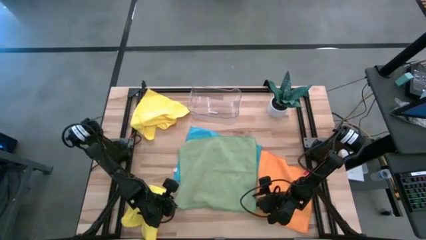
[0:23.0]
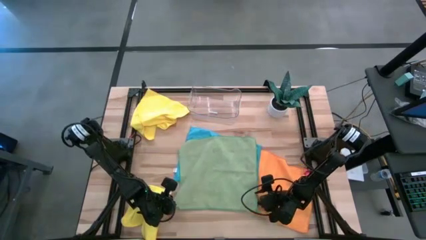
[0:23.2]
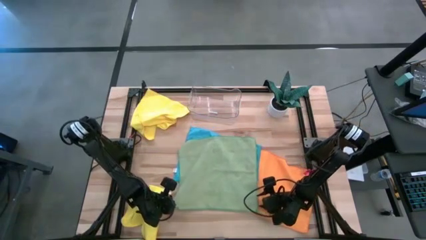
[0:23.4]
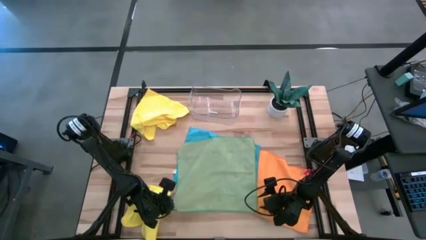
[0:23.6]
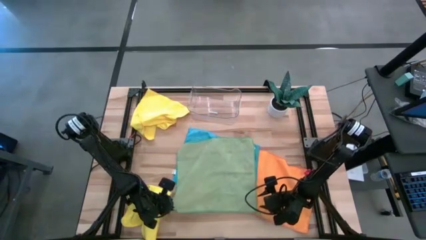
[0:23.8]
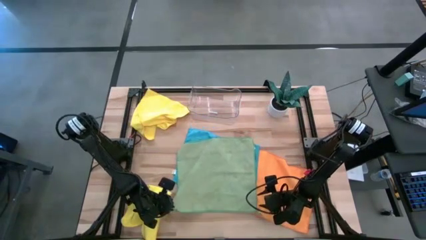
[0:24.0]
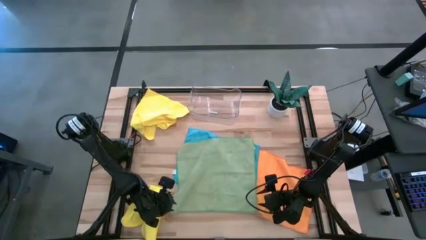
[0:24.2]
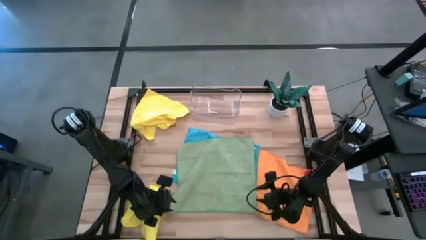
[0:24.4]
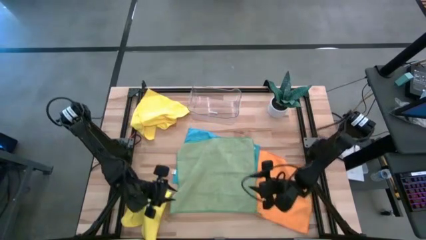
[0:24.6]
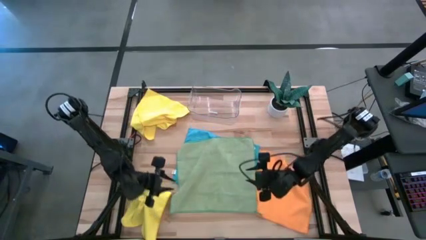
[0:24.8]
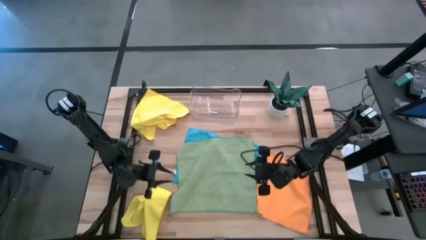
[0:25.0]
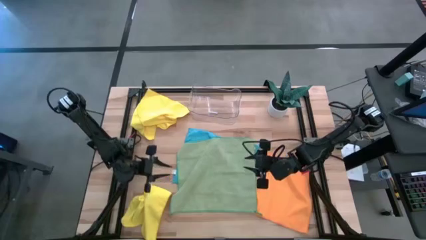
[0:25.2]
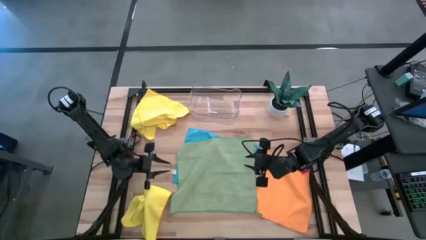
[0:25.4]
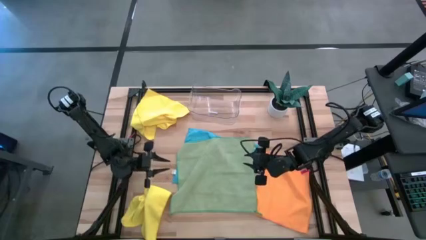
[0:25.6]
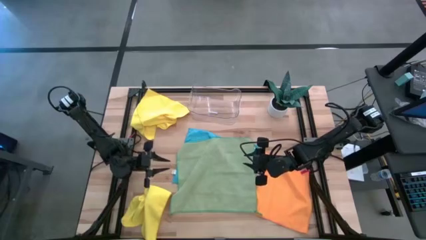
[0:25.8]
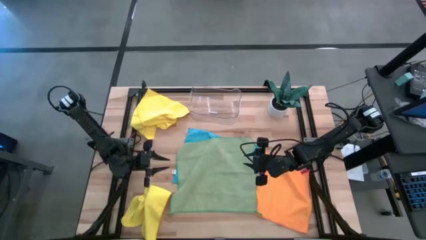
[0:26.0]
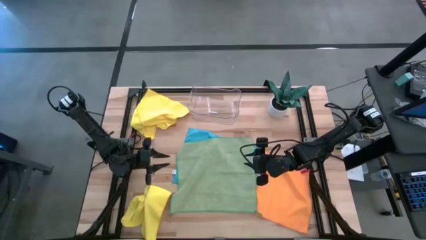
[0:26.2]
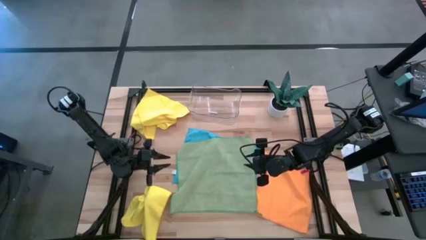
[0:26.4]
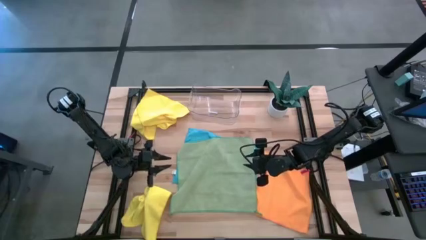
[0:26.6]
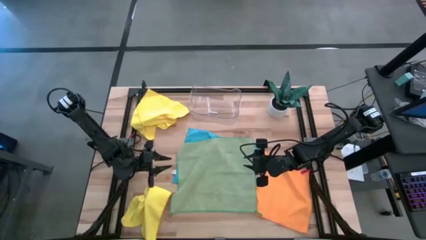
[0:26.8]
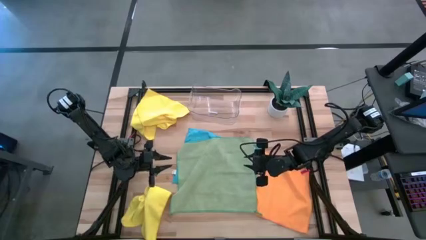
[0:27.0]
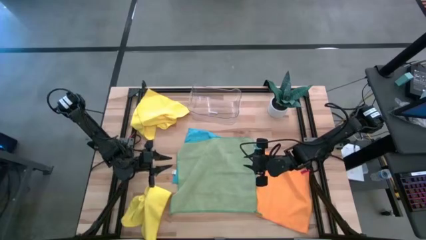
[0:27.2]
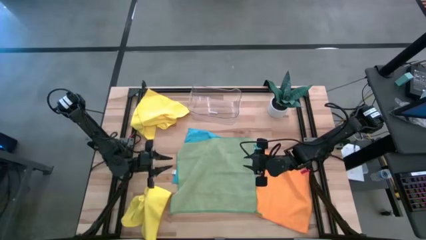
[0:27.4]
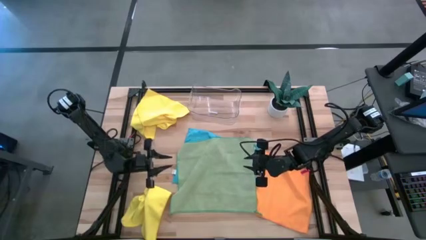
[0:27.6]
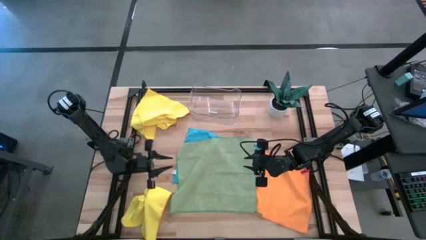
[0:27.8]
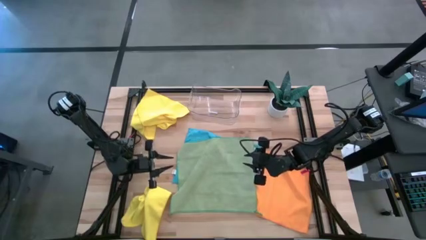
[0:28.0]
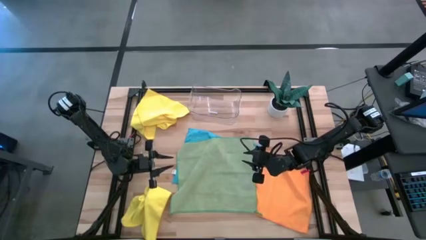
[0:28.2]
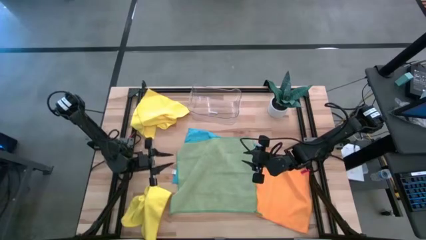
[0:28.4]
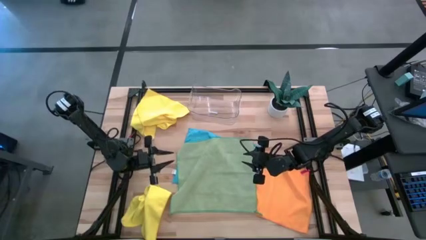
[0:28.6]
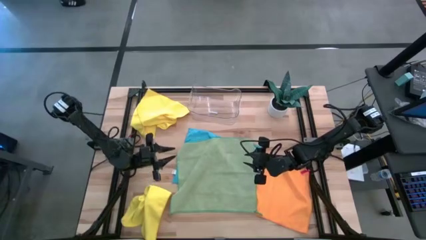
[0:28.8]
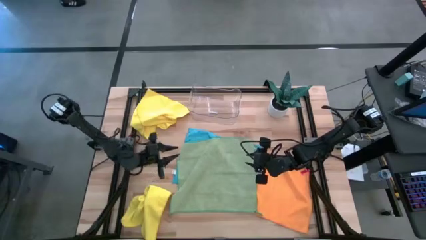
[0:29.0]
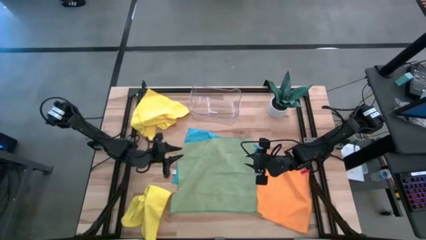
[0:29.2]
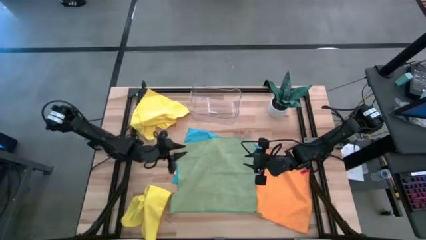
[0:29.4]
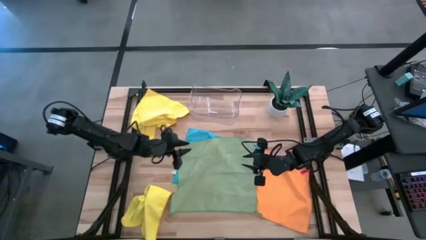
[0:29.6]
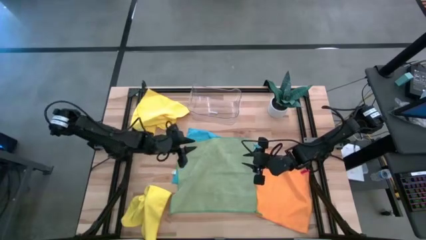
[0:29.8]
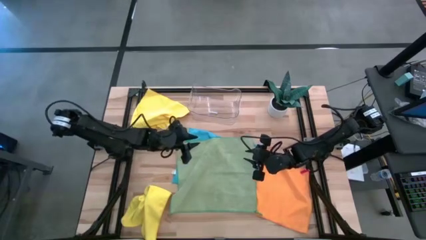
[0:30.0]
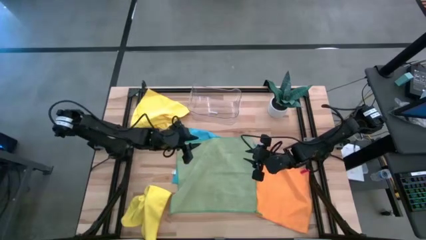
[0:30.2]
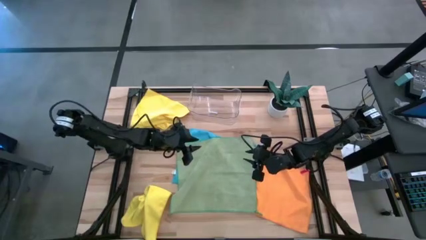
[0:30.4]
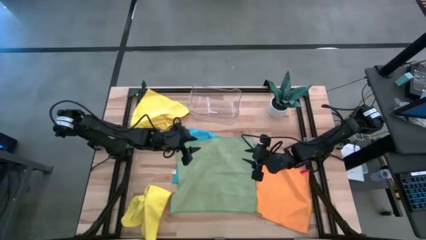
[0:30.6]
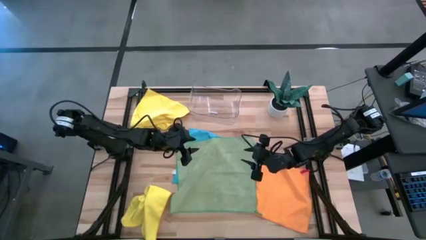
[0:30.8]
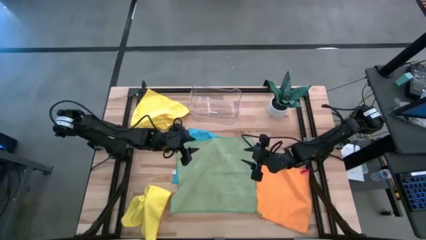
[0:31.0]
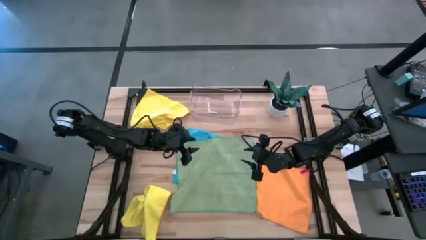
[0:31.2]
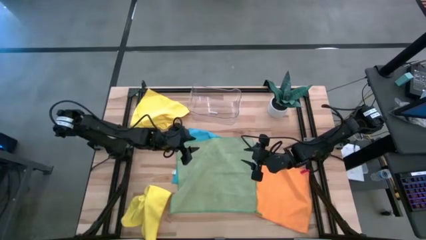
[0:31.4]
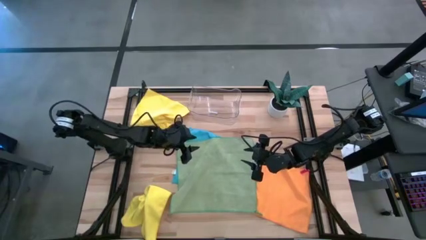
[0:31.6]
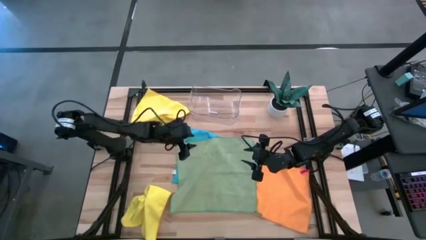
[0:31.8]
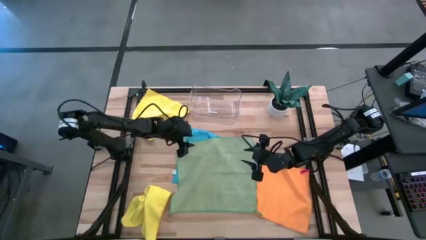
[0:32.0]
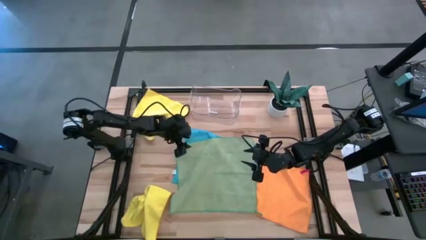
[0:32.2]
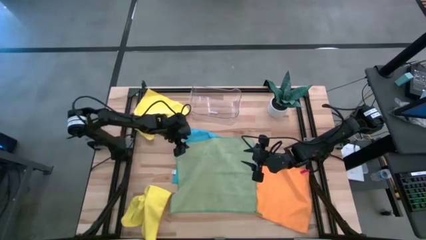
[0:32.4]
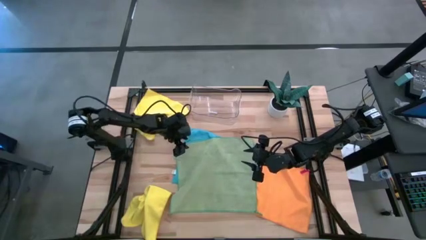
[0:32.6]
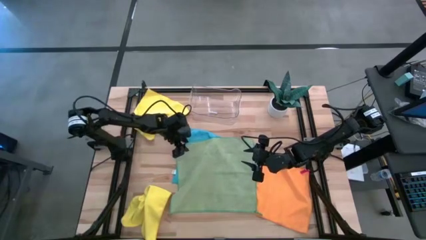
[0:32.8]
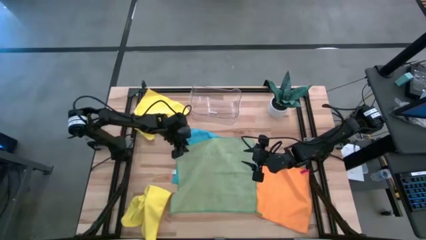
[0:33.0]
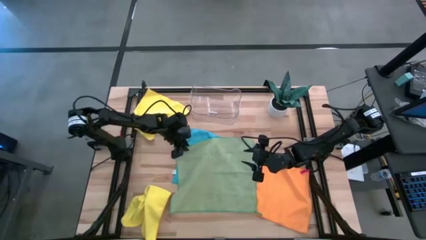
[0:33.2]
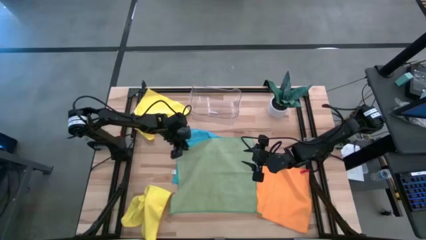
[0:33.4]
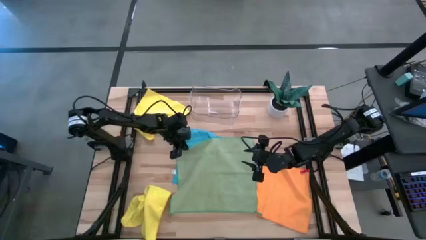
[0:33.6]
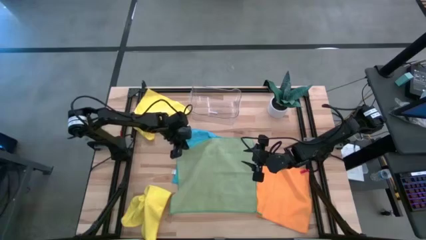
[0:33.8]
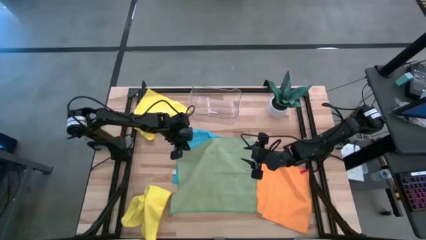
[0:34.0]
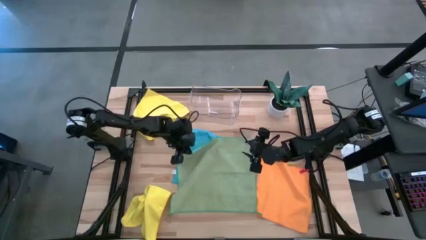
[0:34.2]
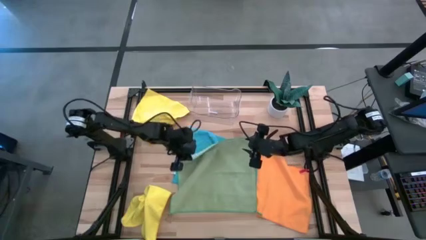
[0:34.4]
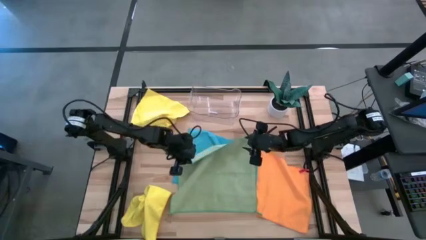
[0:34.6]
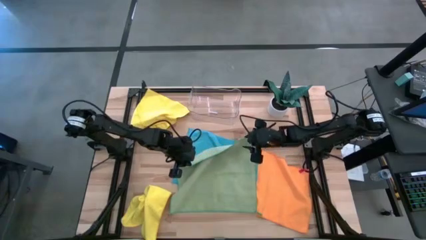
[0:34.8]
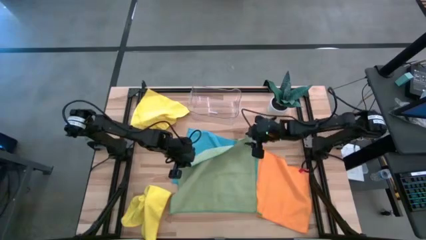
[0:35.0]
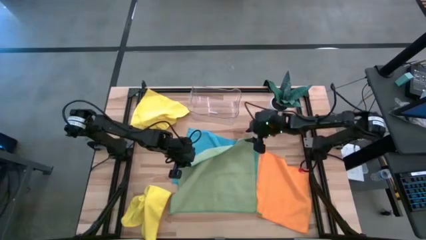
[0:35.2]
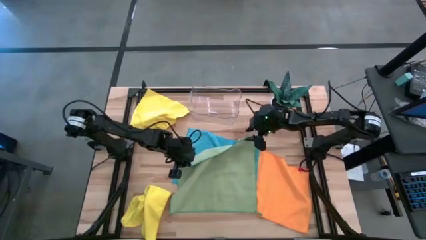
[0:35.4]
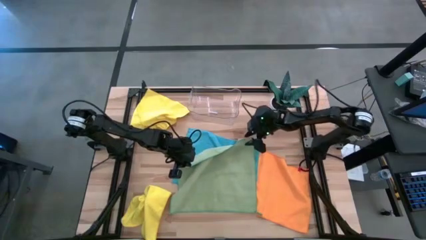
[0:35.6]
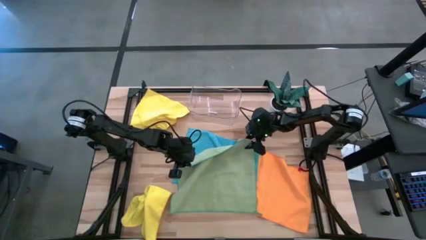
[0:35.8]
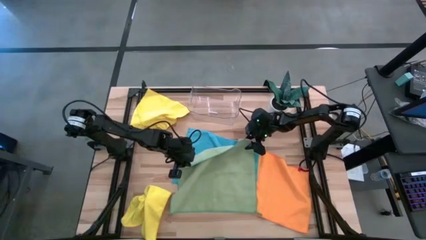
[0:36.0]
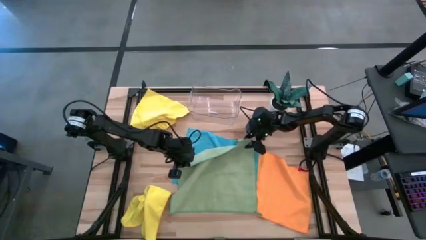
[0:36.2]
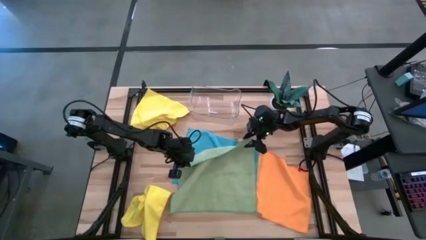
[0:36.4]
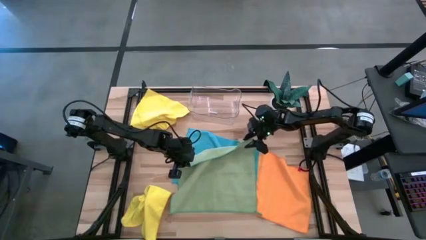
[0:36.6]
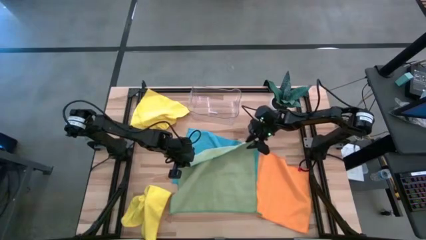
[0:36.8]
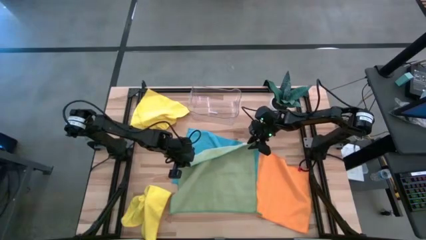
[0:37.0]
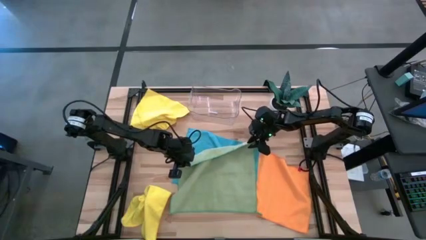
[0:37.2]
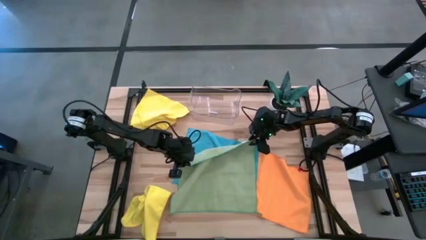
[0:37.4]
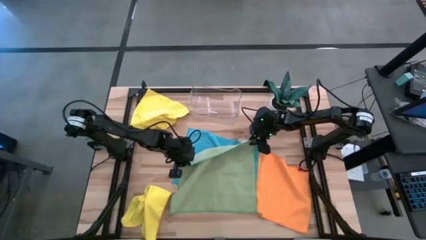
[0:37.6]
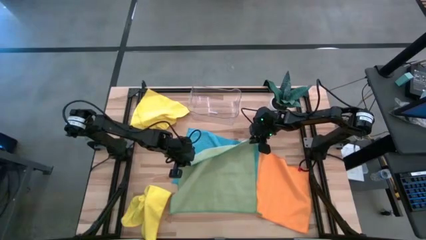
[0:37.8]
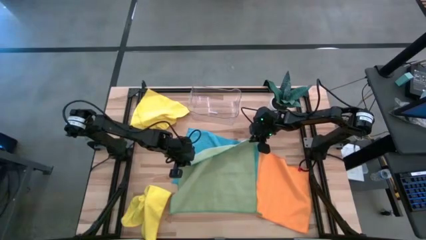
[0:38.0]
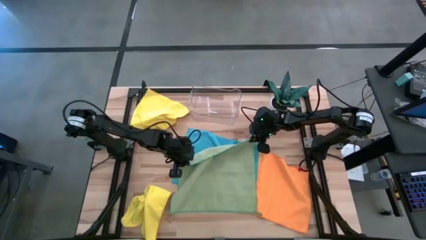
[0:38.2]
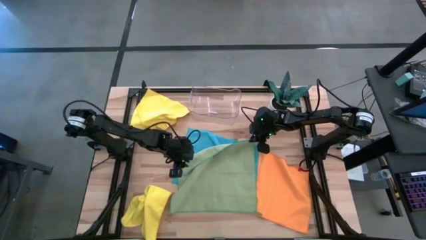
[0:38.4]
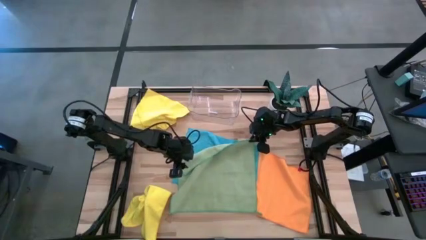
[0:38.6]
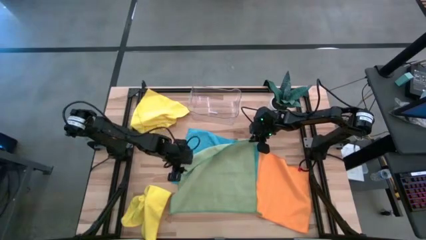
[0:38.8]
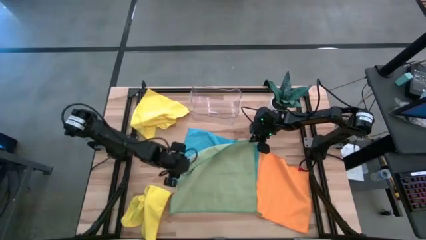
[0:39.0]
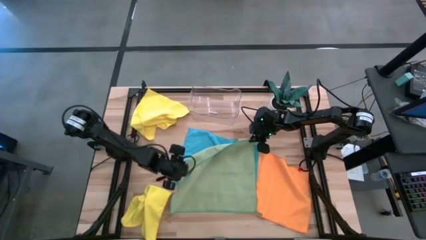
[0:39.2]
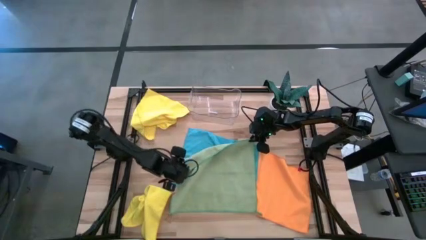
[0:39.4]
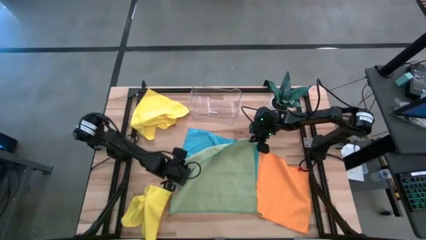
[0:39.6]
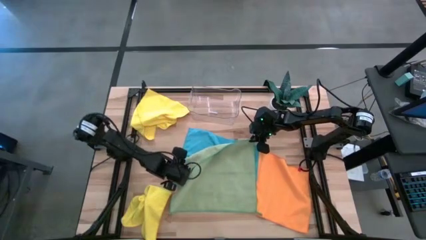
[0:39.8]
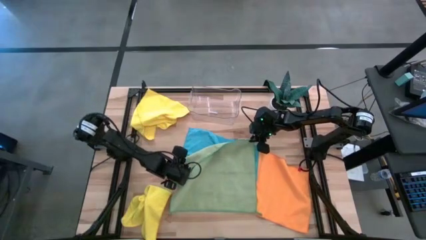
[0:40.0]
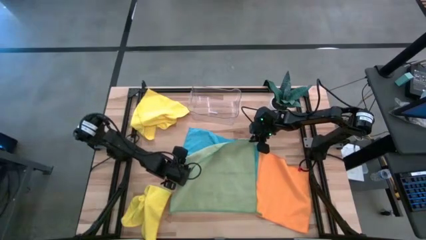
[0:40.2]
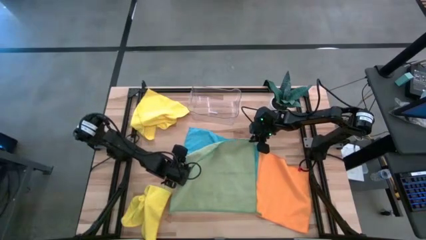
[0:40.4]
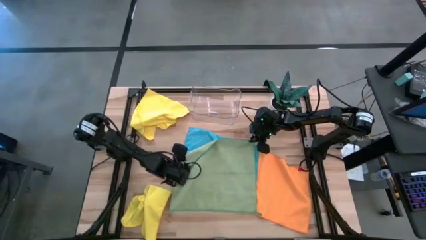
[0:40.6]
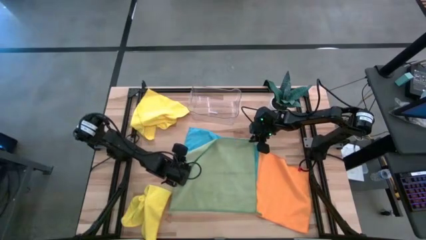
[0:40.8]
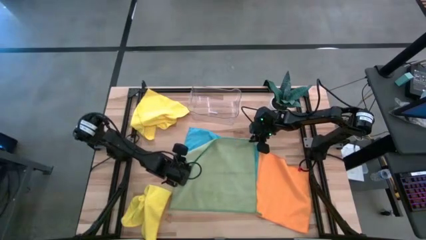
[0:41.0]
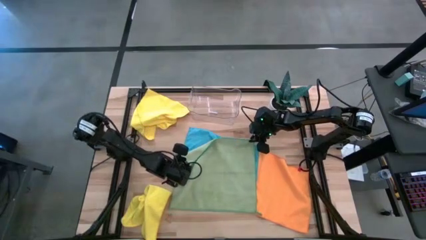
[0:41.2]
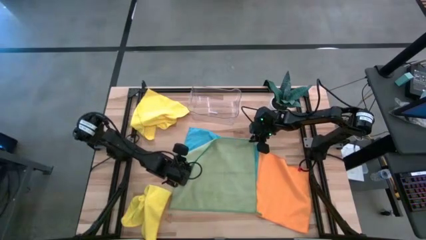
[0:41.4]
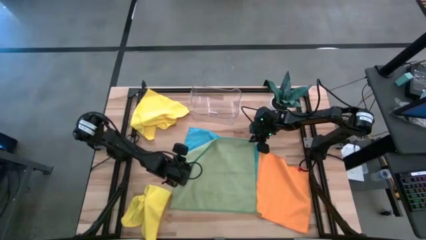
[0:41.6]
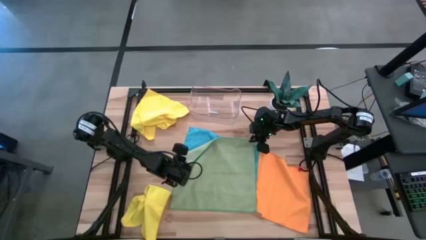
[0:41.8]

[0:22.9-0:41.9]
Task: Fold microfiber towels
Fold the green towel
